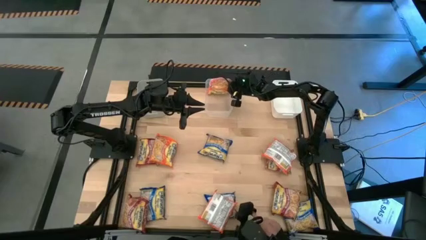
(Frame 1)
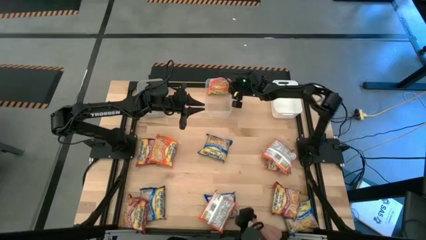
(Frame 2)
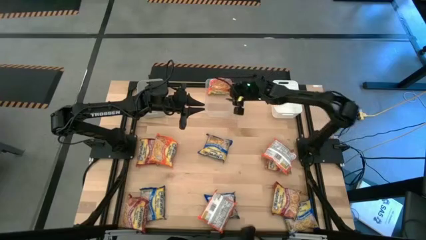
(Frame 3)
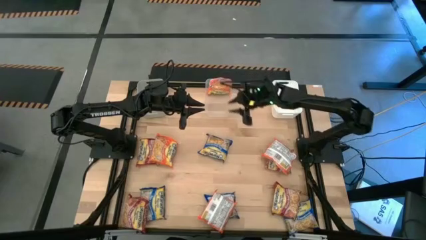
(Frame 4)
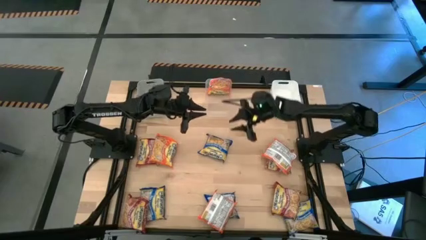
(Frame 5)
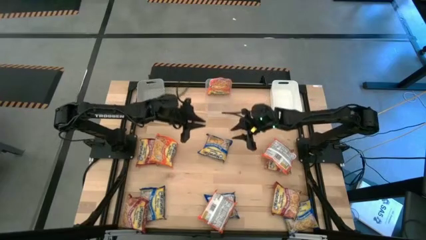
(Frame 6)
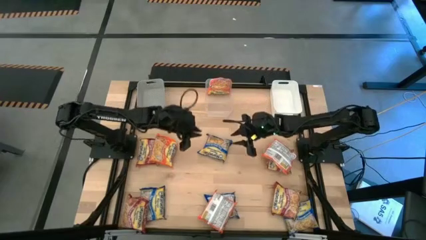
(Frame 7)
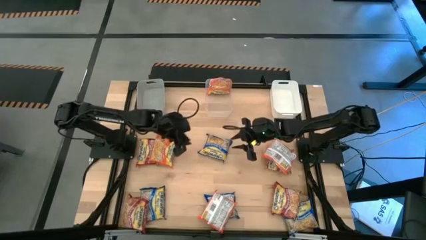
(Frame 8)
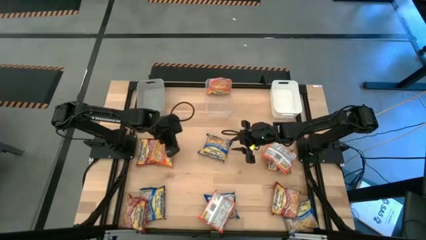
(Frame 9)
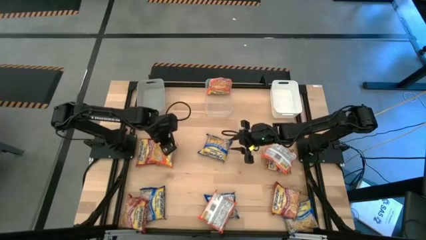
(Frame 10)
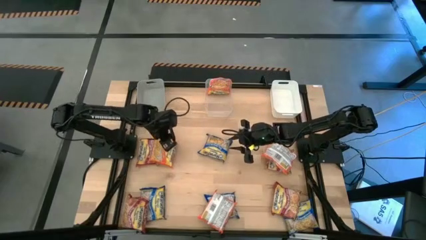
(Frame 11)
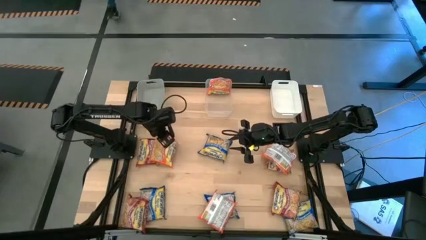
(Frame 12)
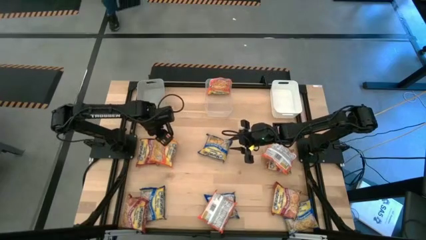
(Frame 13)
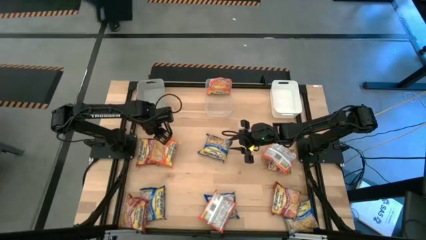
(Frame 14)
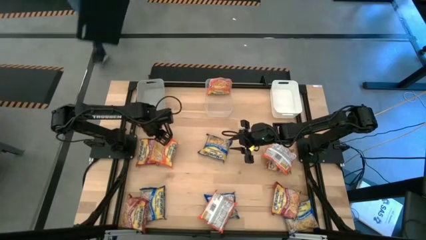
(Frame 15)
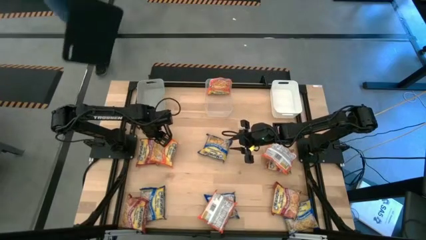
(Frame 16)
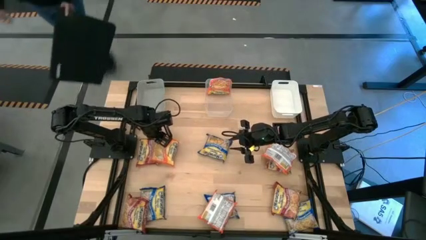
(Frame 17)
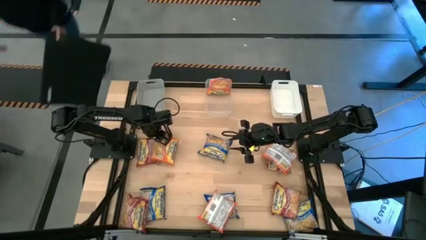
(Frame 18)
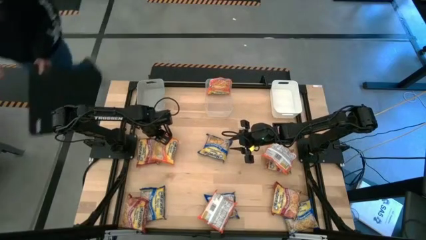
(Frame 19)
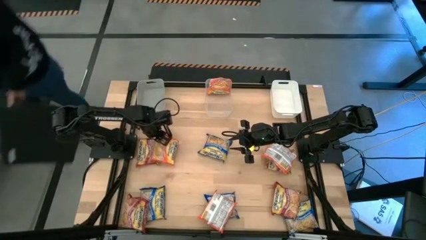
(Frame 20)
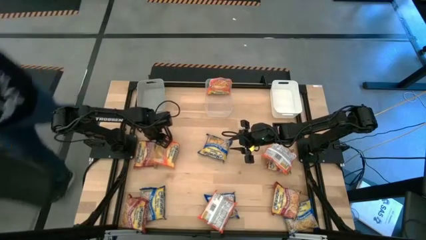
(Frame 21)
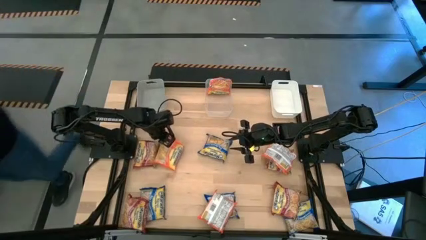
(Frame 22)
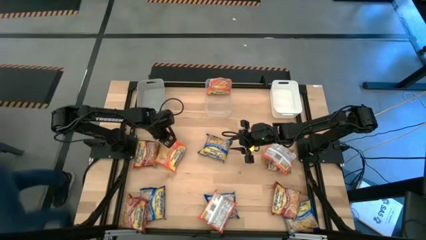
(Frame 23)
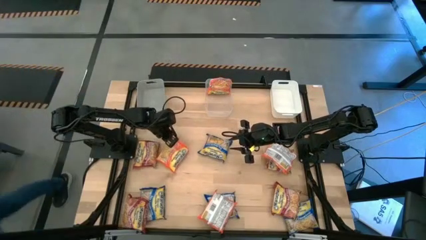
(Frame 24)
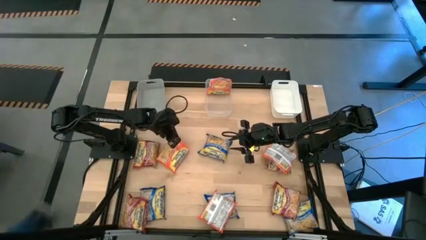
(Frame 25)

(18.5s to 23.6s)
Task: Sort Maruchan noodles
Put the top left orange noodle into the transparent bin

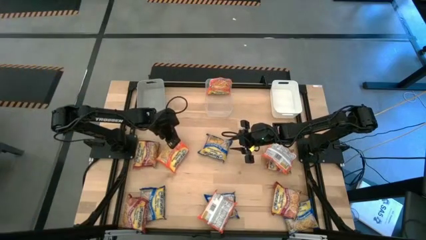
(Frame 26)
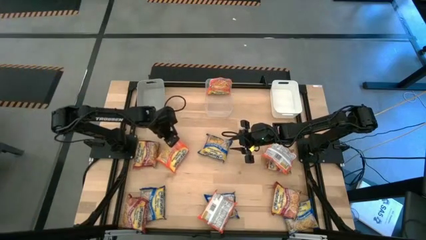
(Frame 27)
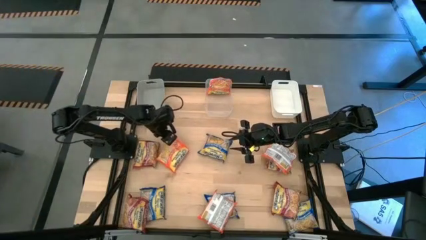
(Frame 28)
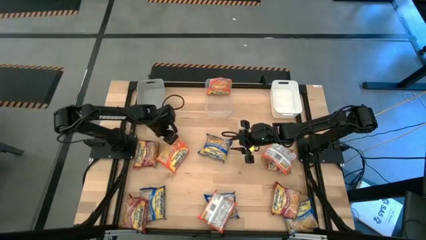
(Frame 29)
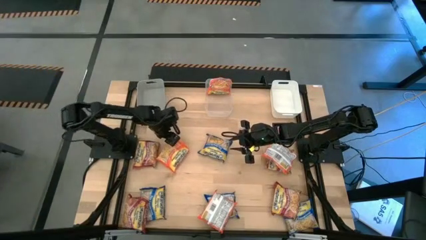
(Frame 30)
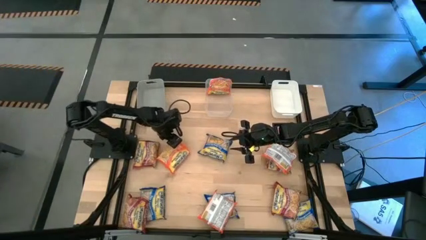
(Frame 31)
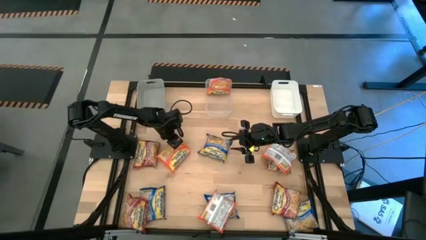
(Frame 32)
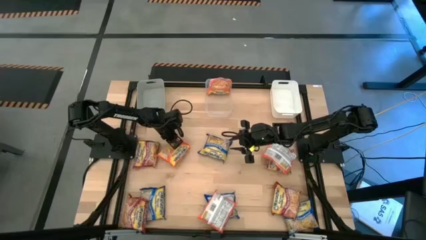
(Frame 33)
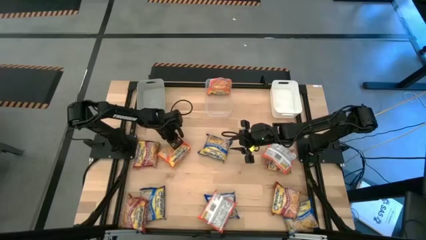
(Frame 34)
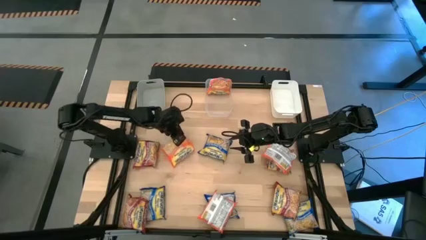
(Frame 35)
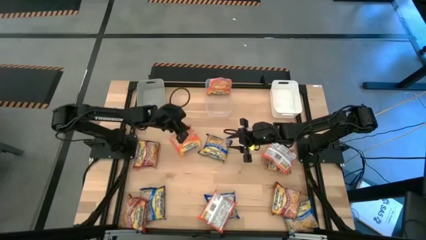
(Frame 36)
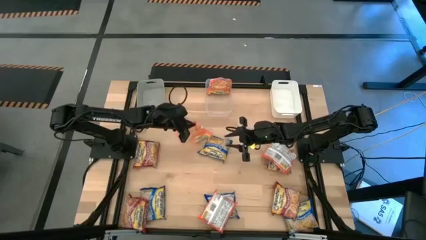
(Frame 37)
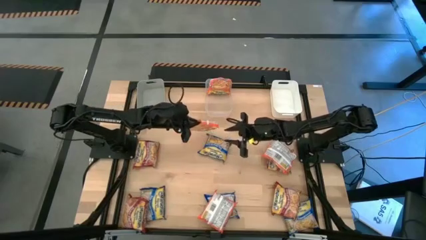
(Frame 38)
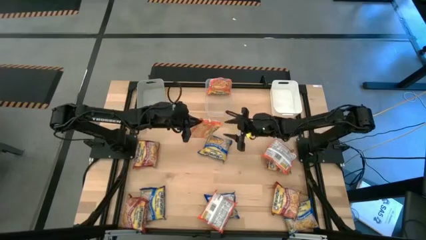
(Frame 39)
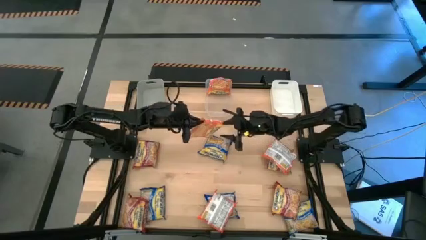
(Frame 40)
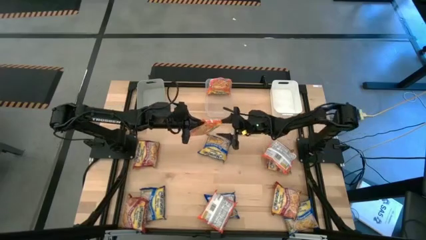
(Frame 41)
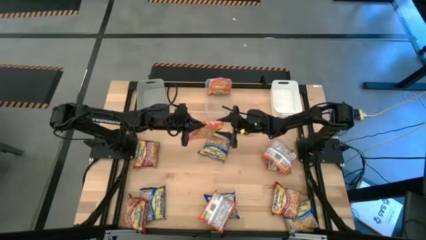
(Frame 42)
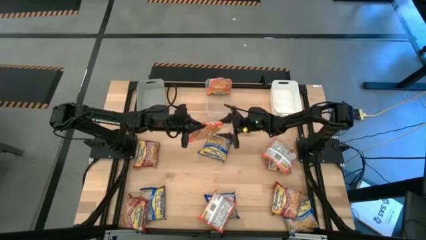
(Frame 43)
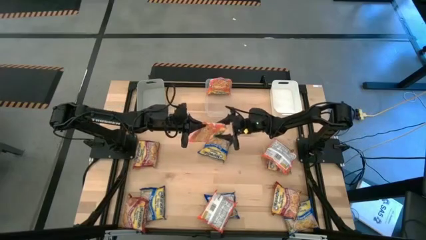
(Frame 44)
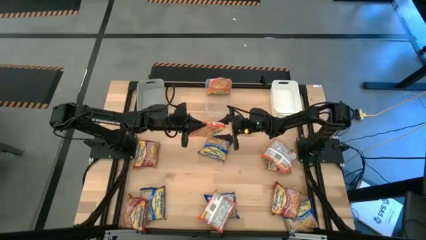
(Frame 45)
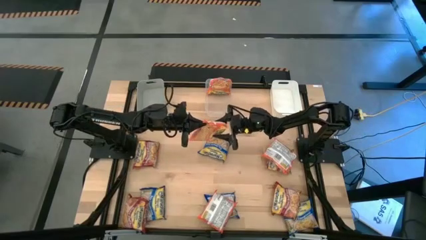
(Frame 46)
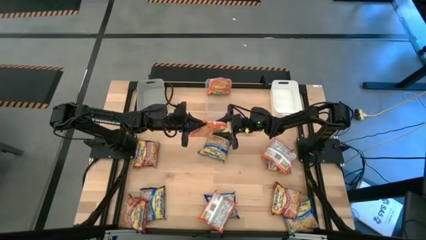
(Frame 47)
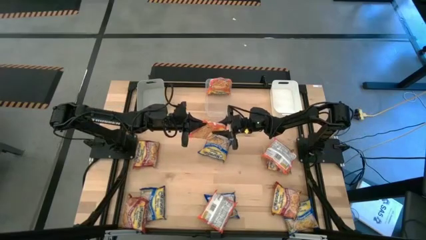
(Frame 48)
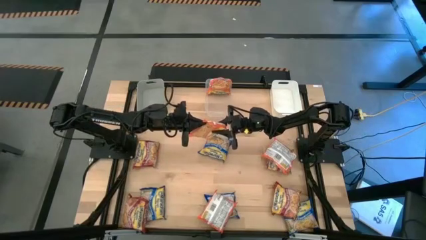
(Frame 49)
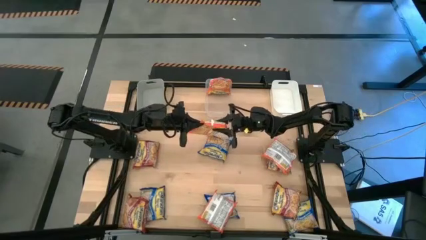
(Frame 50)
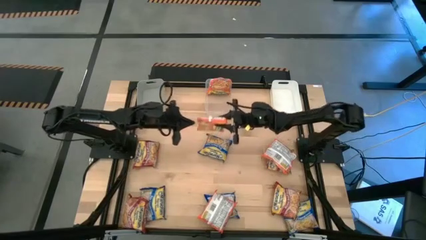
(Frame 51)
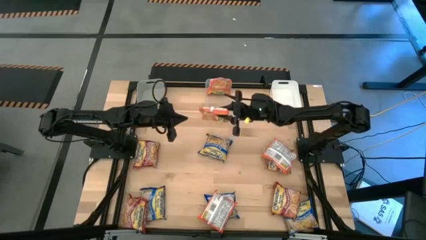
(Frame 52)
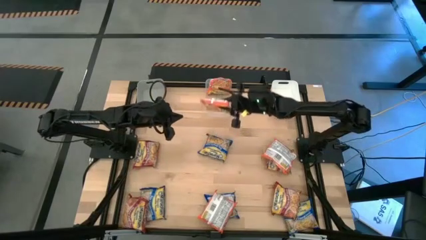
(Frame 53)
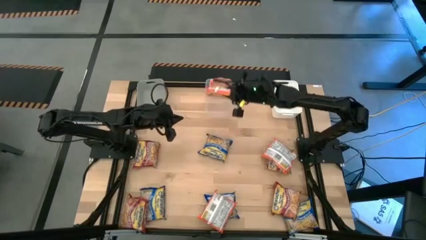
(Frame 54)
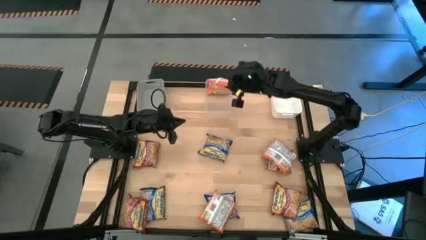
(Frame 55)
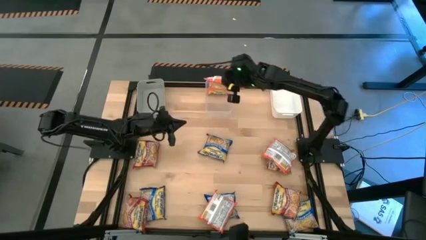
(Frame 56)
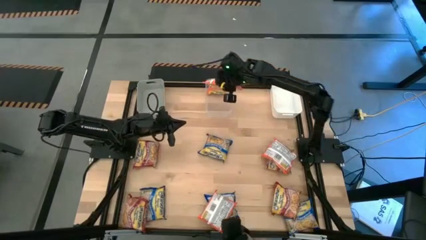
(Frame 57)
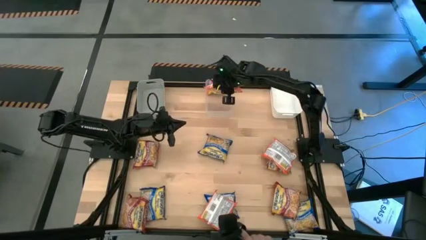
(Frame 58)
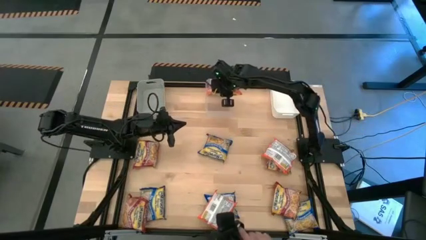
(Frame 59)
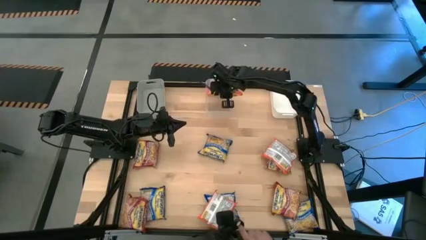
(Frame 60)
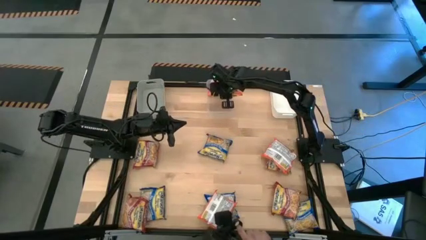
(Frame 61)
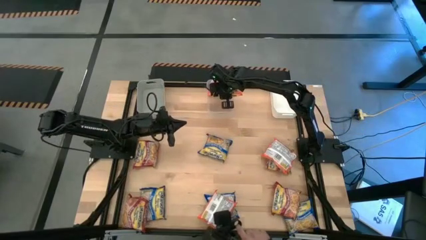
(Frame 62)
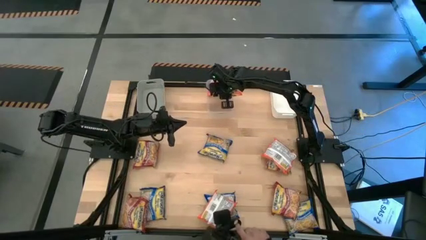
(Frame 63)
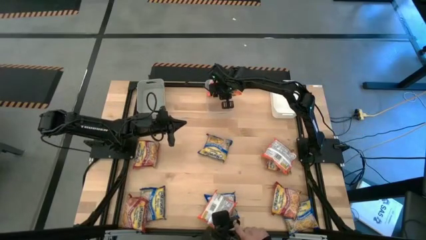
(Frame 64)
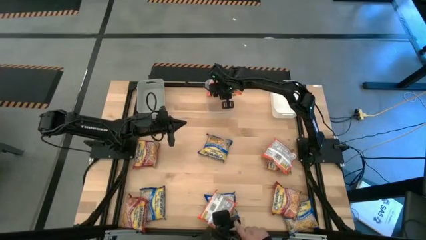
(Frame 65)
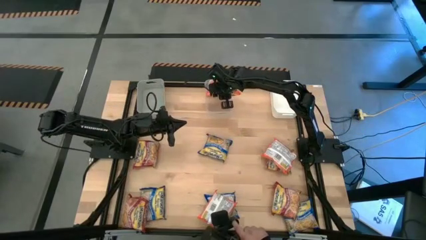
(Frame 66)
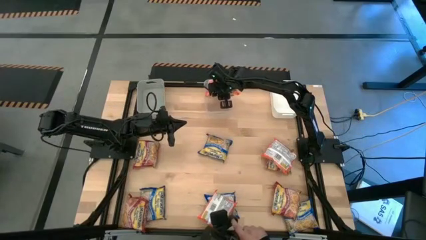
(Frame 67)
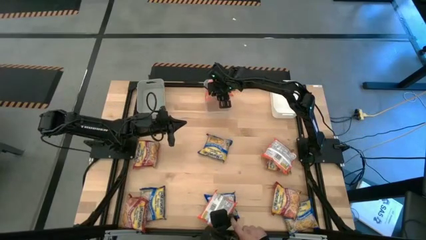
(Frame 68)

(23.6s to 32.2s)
Put the top left orange noodle into the transparent bin
